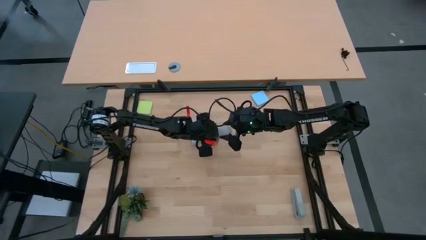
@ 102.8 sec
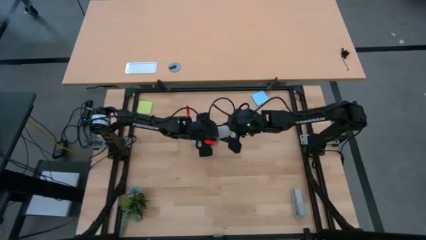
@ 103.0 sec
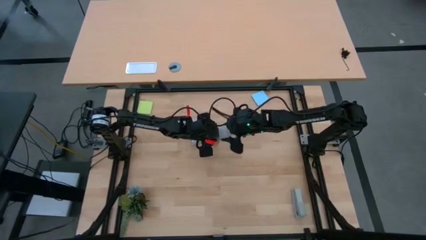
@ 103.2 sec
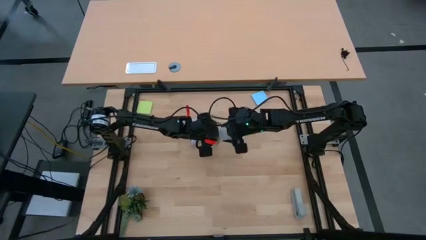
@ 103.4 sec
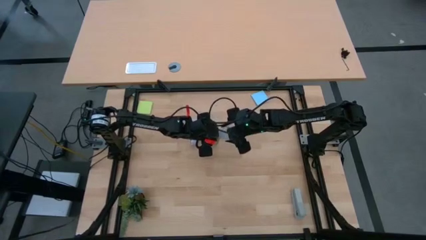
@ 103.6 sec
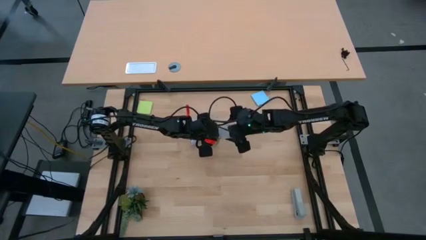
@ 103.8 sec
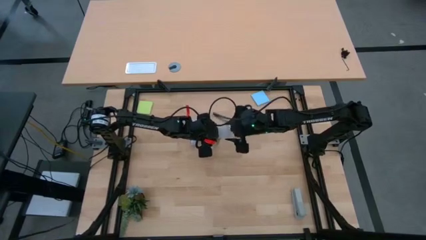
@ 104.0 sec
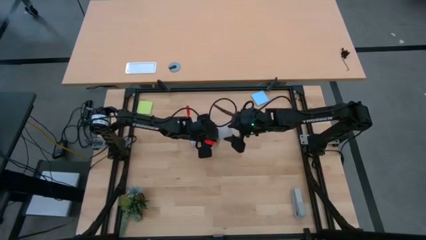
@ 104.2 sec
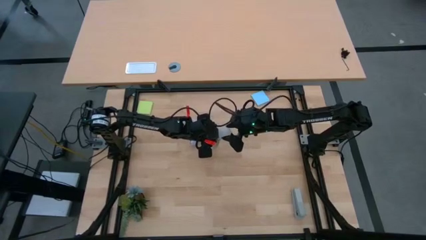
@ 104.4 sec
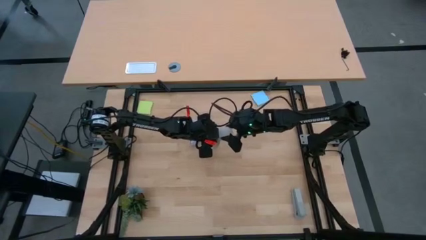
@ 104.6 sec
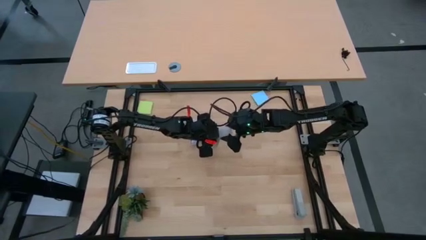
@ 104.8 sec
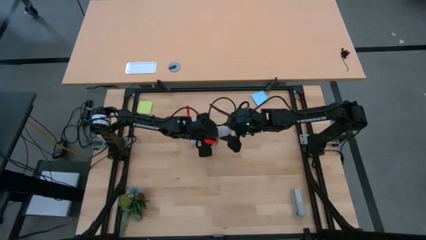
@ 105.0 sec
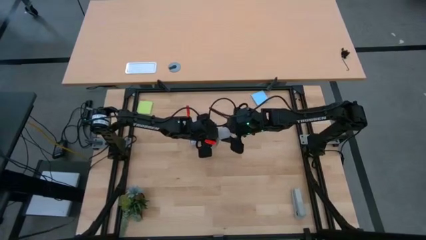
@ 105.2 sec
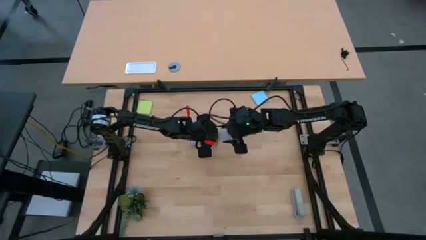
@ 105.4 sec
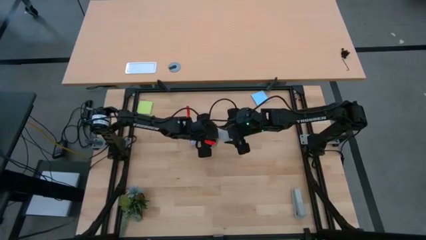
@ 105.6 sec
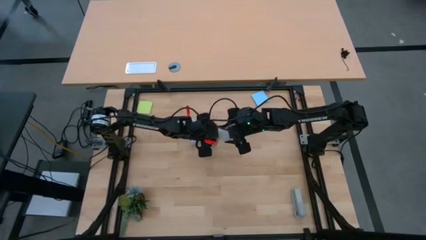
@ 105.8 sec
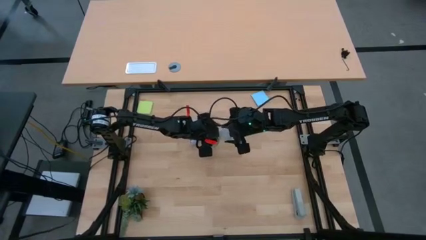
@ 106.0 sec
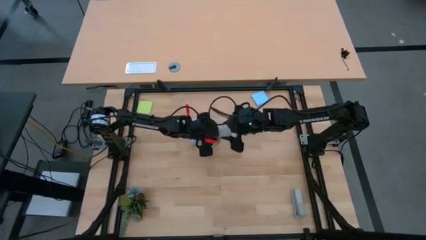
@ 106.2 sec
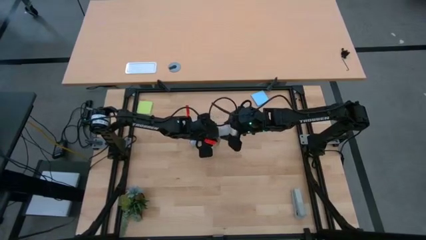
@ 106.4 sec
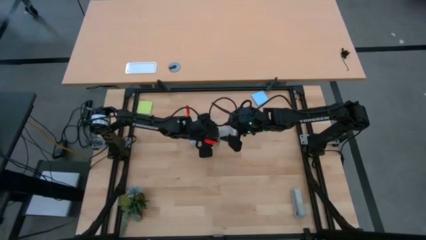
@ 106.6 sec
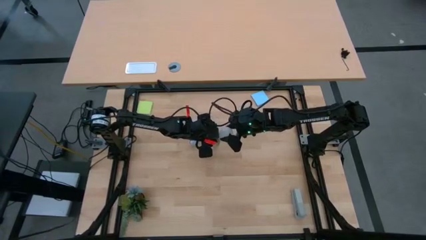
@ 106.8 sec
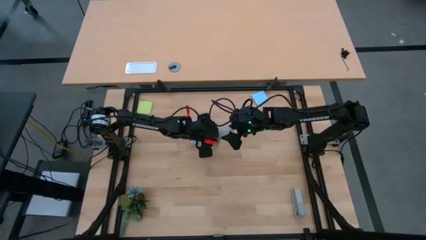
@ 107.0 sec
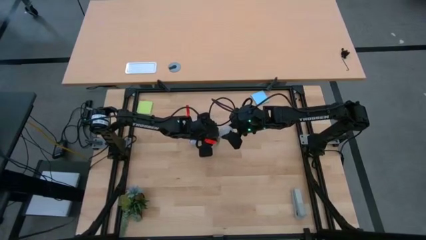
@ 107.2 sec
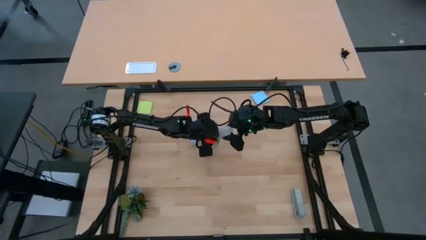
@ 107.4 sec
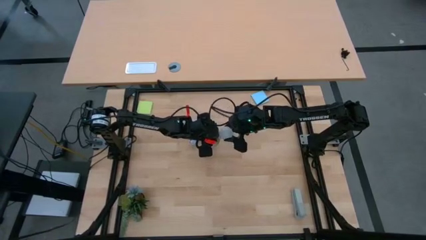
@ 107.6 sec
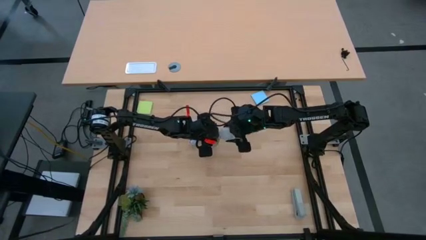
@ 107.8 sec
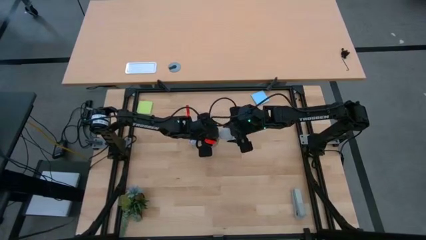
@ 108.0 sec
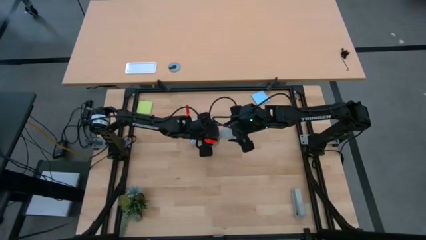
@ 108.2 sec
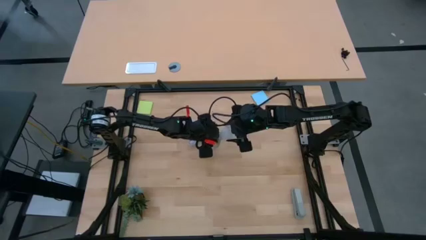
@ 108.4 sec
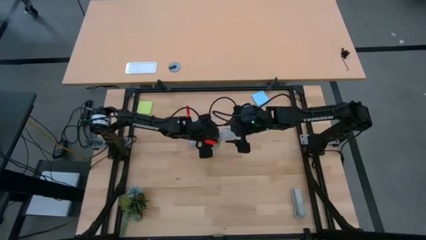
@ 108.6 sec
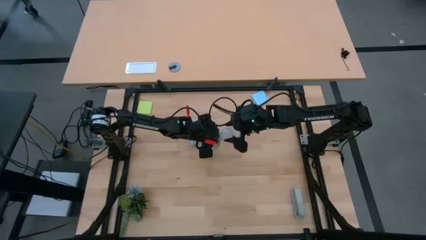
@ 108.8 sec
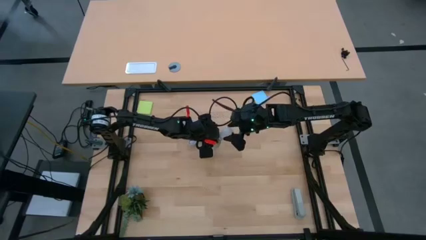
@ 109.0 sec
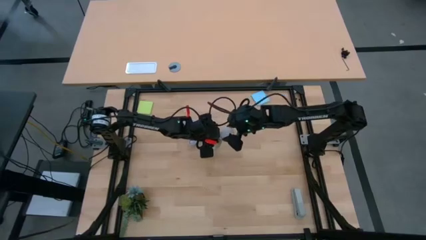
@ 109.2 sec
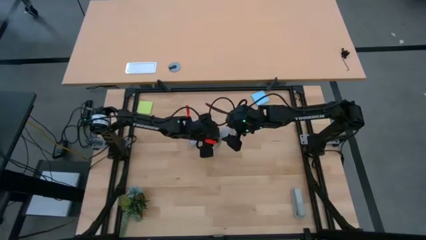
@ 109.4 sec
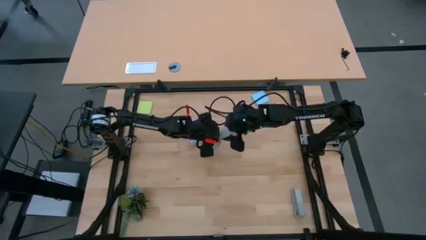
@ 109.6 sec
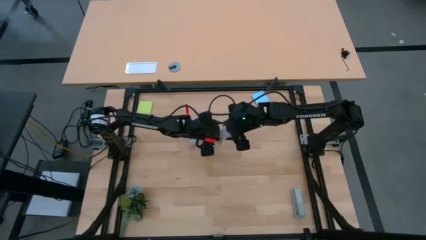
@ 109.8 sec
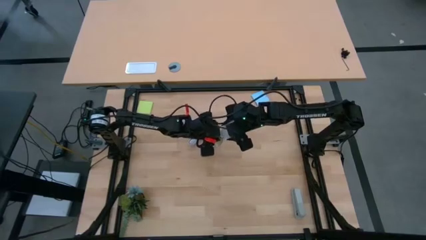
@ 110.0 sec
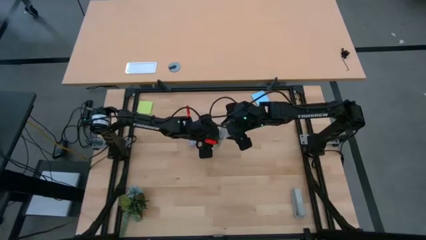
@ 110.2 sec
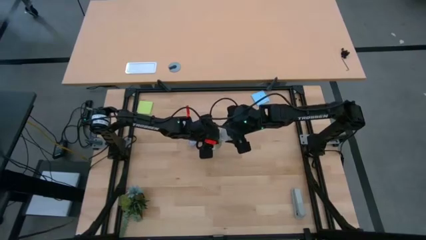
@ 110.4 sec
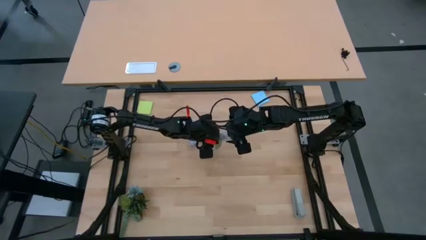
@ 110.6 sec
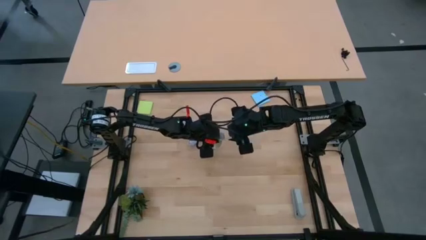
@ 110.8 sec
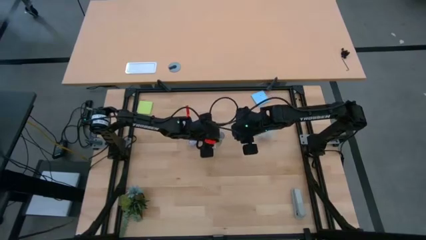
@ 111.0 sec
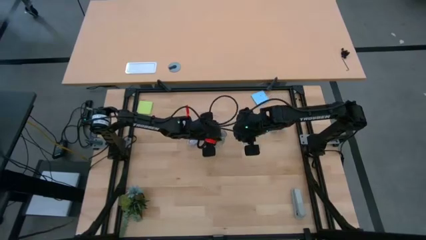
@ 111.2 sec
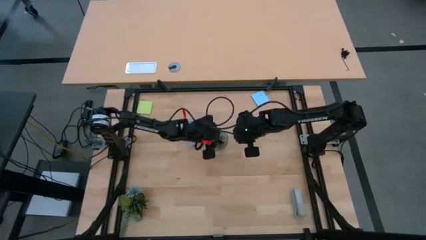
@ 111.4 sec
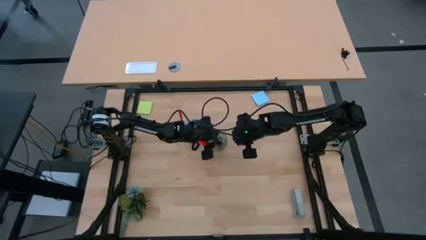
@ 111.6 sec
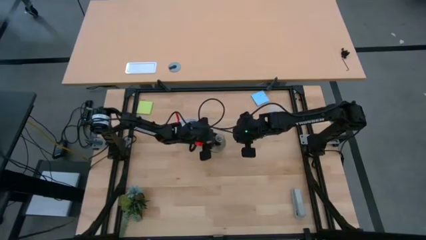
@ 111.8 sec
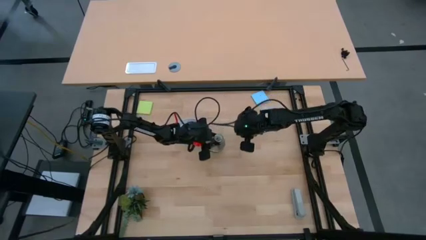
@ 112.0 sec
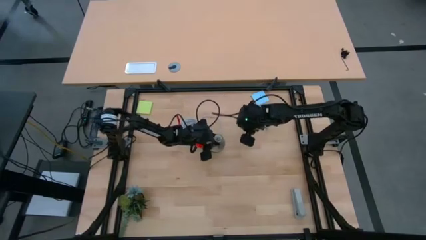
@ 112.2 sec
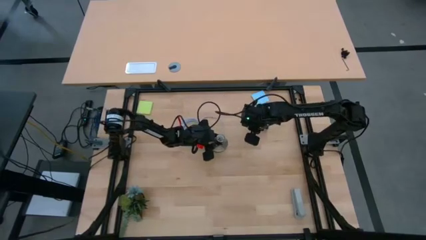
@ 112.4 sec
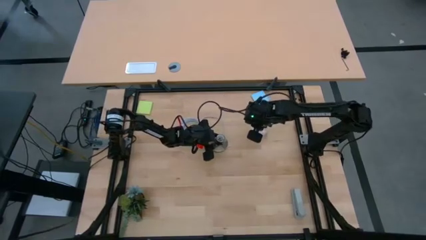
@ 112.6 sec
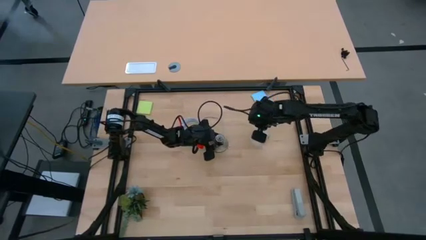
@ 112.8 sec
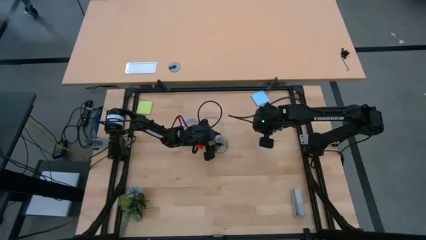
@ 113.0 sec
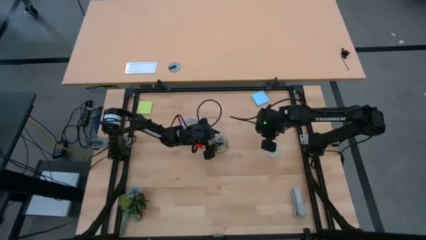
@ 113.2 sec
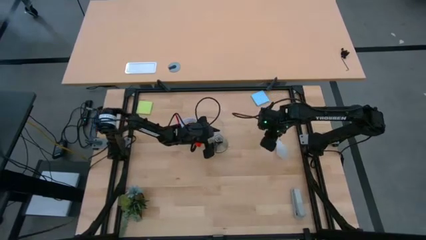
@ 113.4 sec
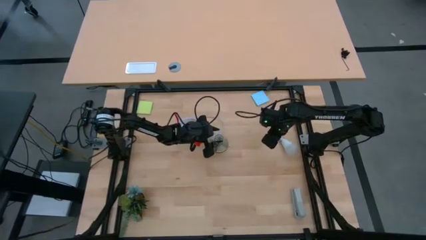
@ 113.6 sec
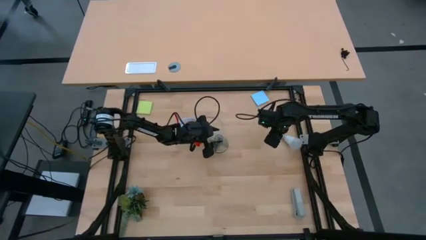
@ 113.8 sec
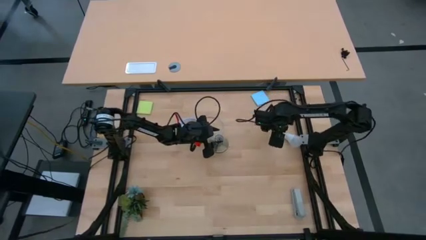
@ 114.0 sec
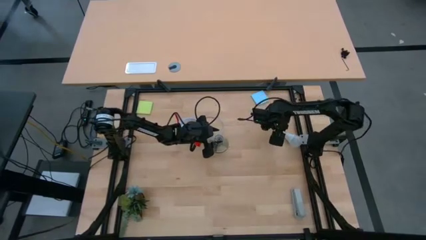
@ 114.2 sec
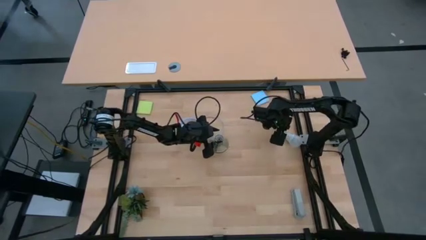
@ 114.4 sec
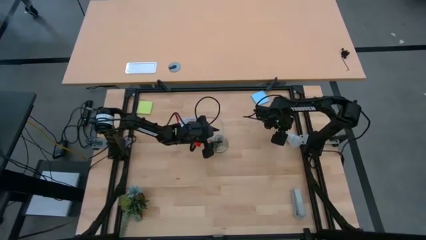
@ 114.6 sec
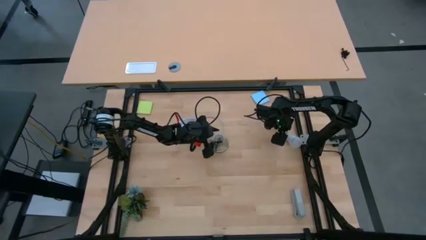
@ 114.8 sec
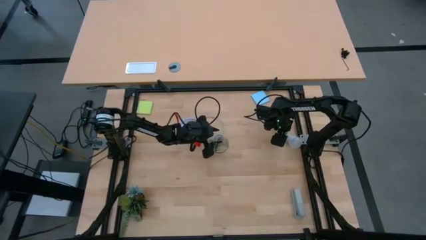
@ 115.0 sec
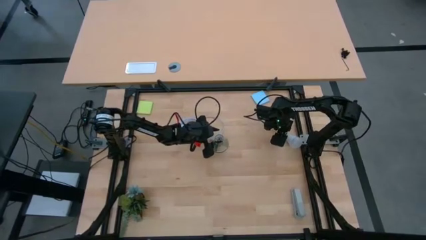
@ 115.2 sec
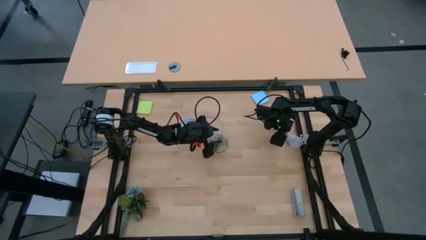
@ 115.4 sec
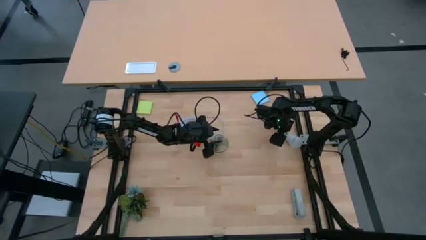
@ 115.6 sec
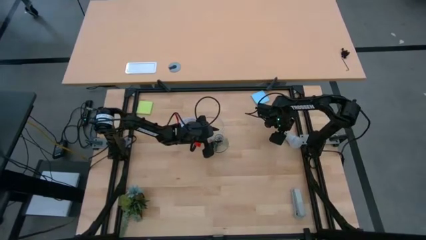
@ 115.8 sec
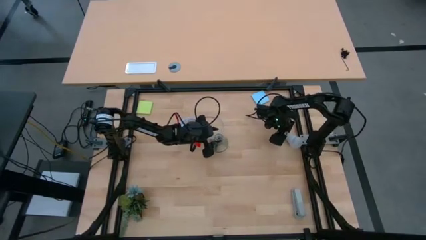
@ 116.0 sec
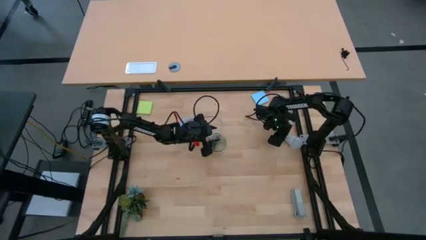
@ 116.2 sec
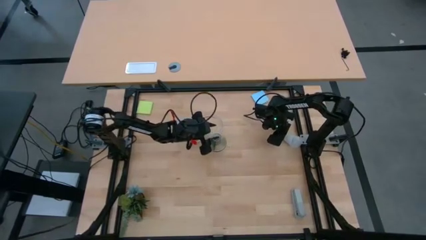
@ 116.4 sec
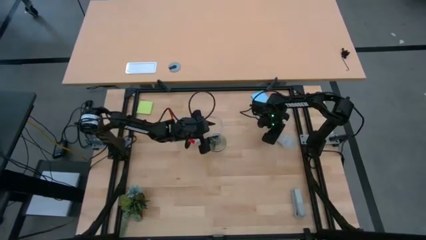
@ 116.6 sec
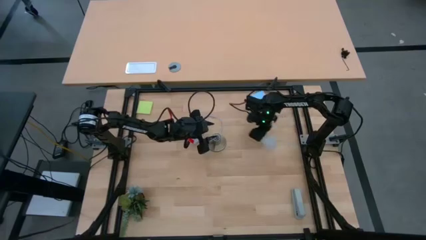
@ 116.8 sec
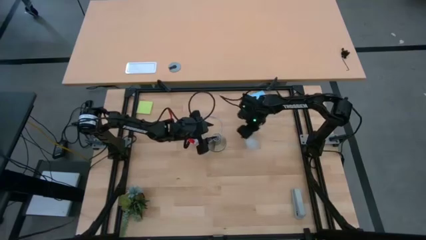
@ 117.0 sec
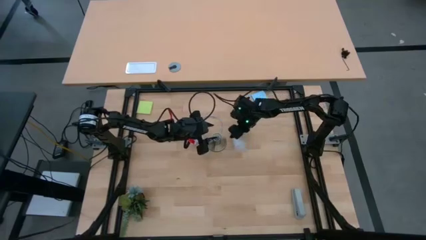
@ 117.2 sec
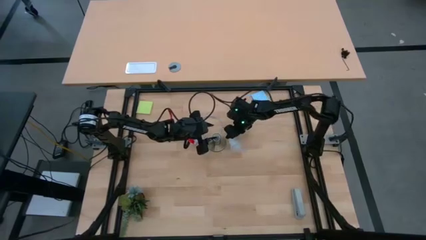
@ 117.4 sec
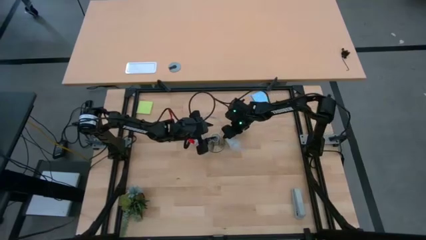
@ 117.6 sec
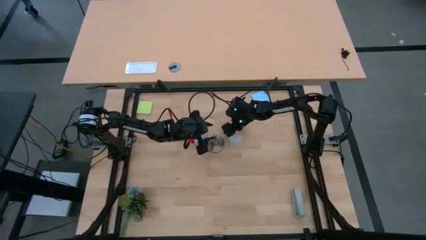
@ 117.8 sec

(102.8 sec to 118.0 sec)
Task: Screw lightbulb
Remove the light bulb from the lamp
